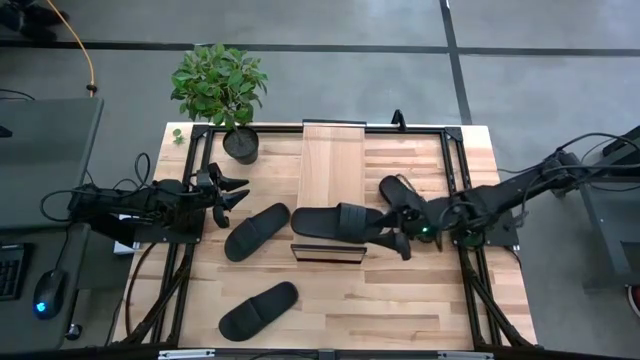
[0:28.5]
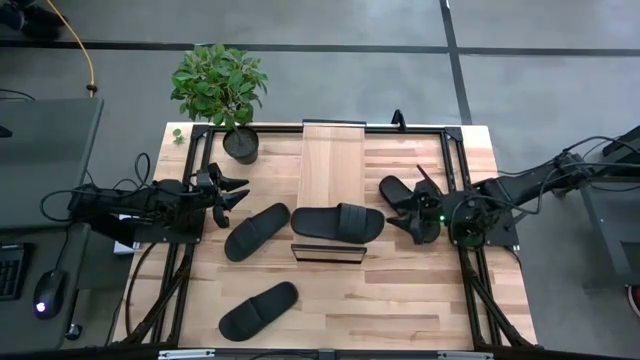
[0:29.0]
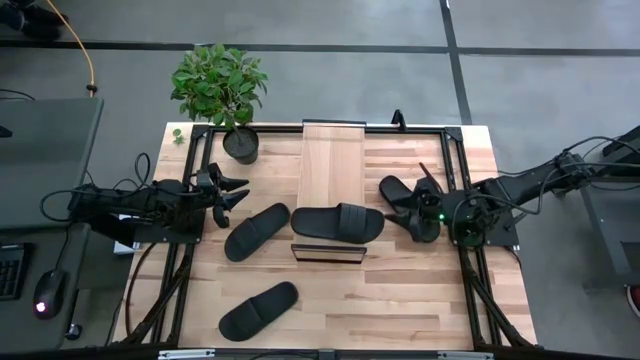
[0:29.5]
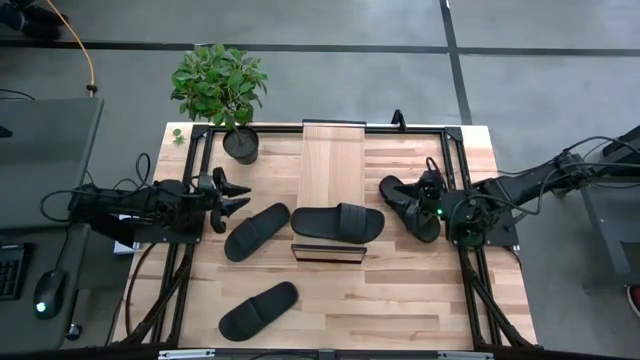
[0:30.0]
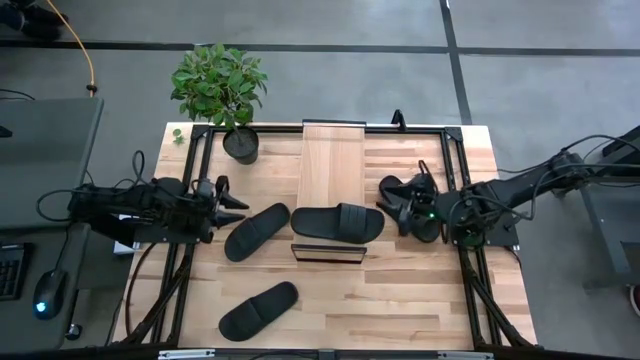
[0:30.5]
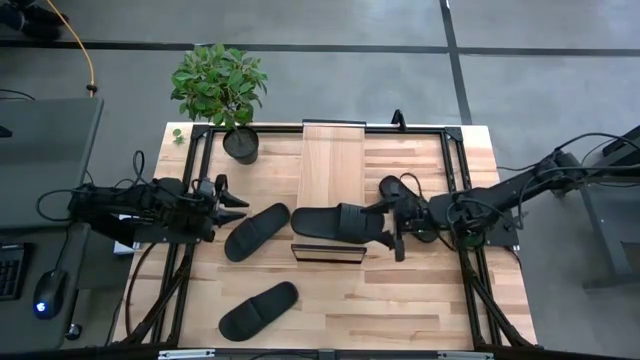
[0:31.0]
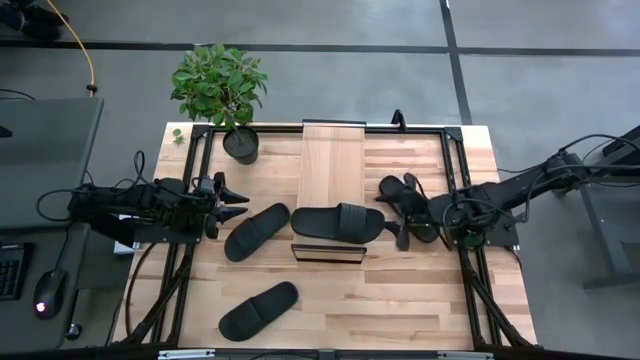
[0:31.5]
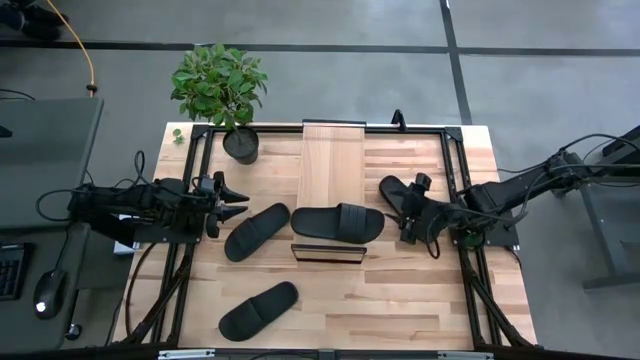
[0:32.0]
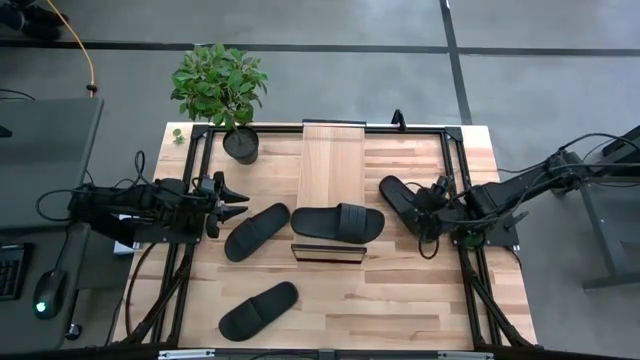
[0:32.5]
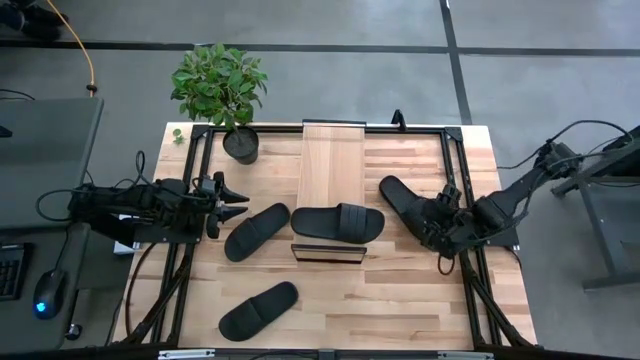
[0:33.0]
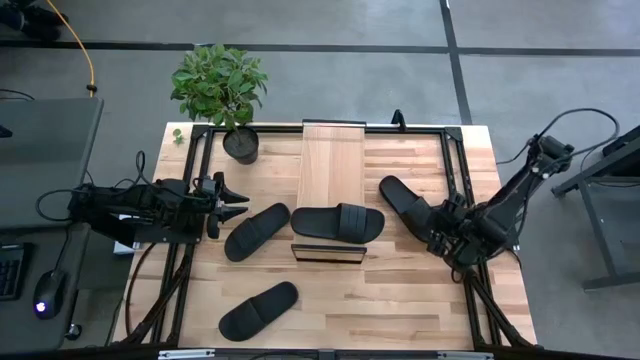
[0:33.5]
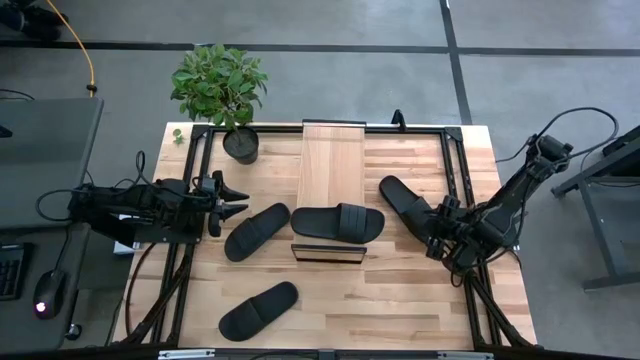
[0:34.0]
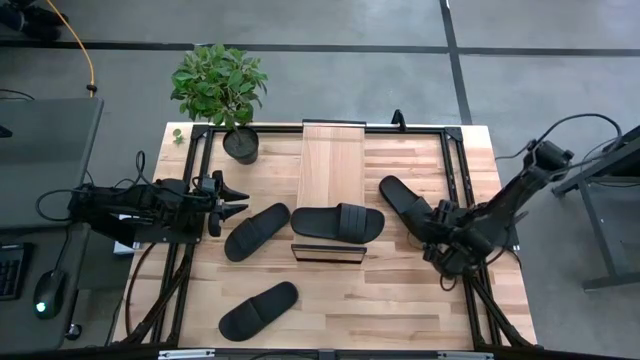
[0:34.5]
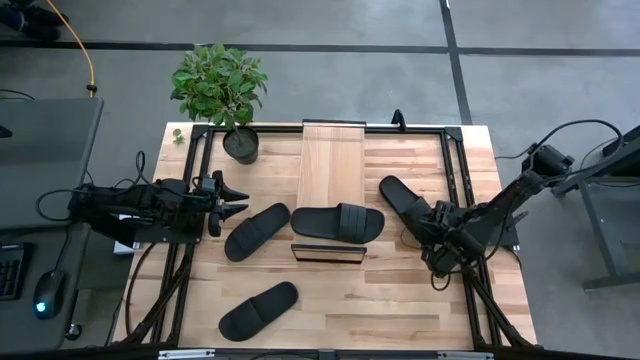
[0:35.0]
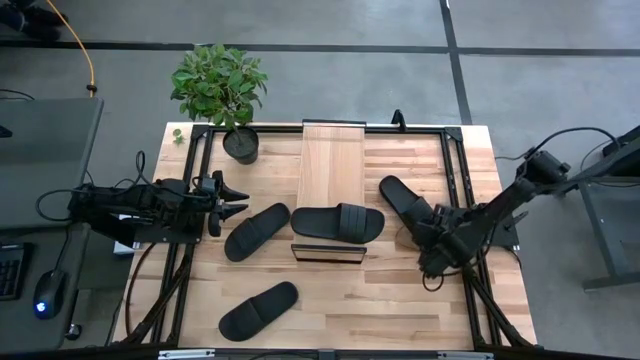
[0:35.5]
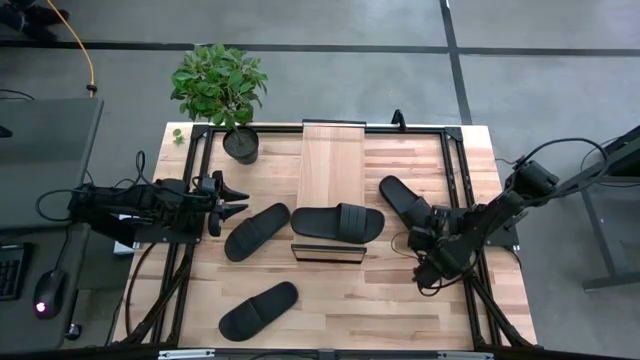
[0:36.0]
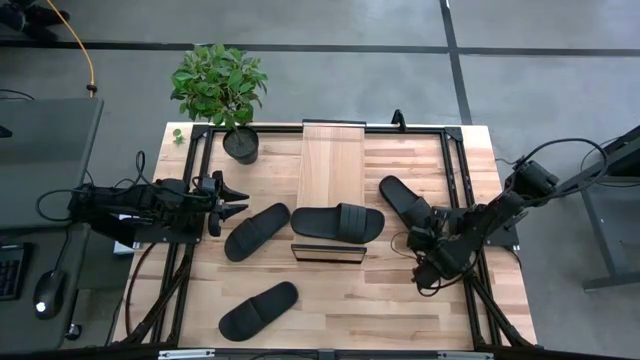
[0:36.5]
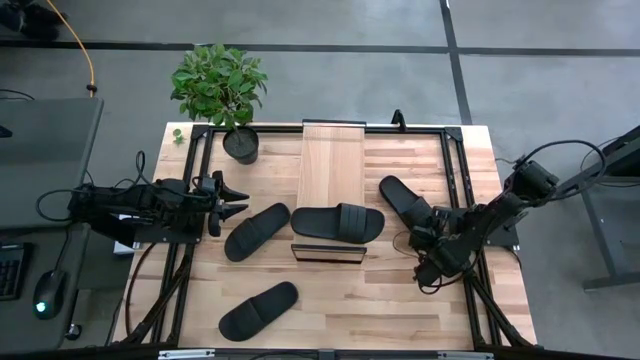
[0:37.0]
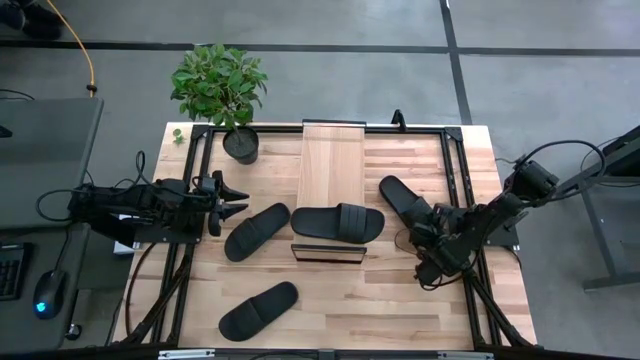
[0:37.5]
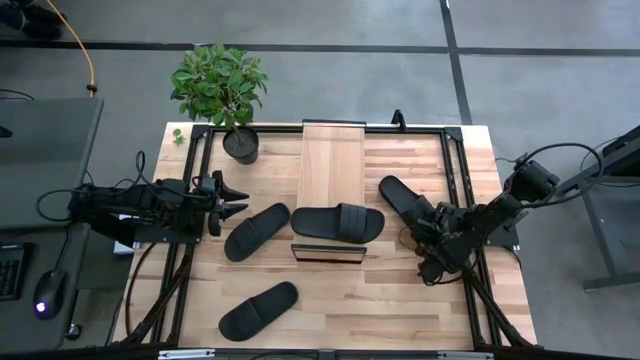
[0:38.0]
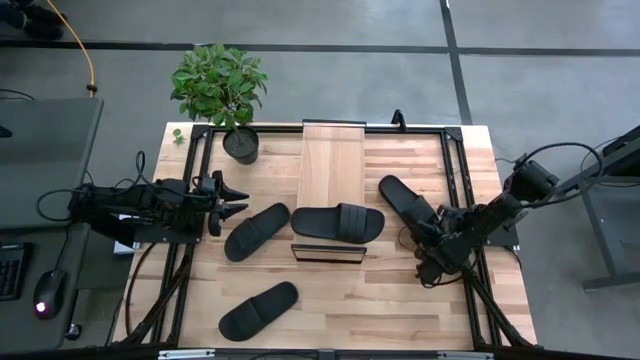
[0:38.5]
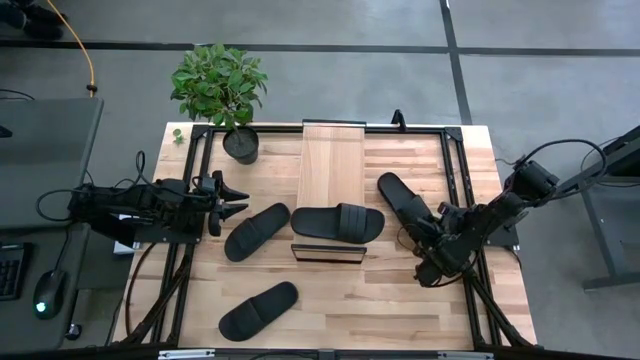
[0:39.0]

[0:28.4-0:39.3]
Task: Pick and place slides into the shelf
Put the black slide on the shelf

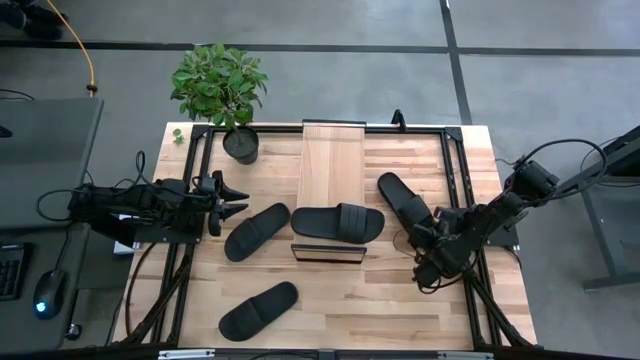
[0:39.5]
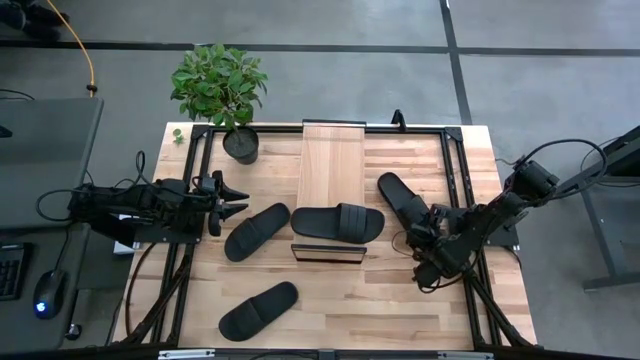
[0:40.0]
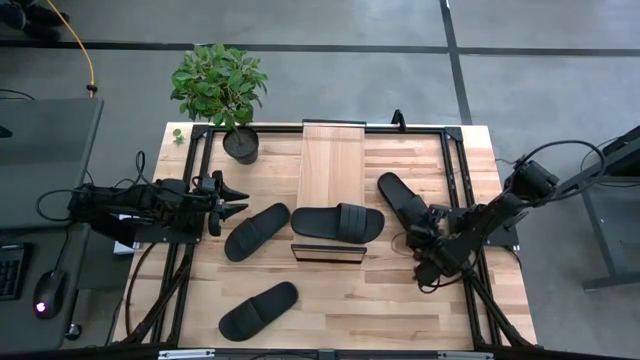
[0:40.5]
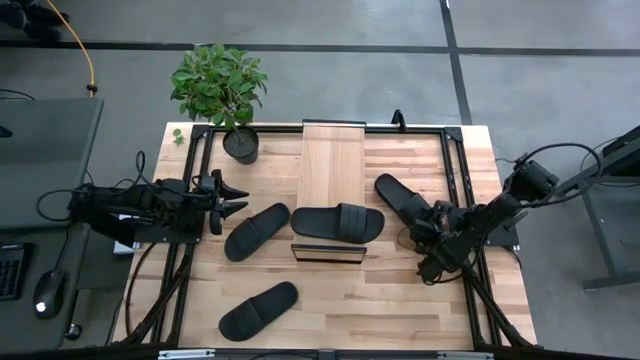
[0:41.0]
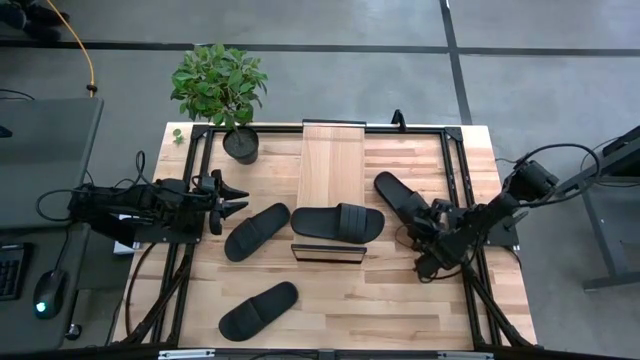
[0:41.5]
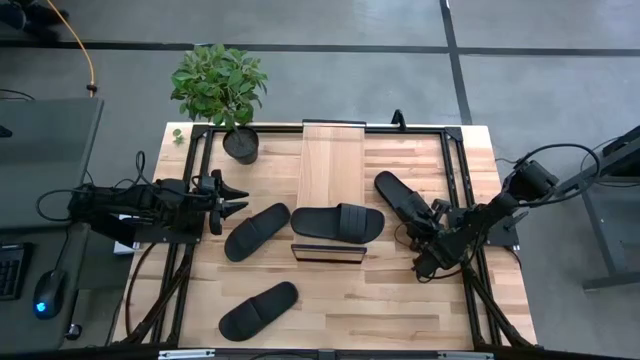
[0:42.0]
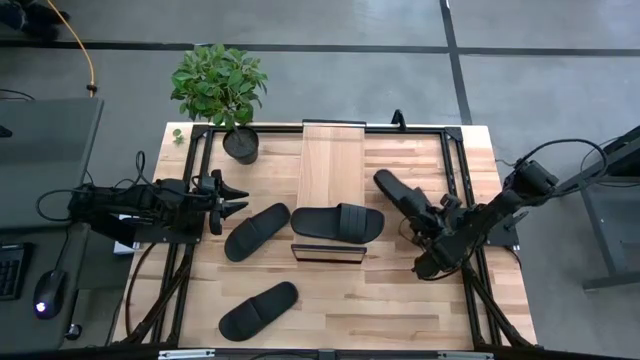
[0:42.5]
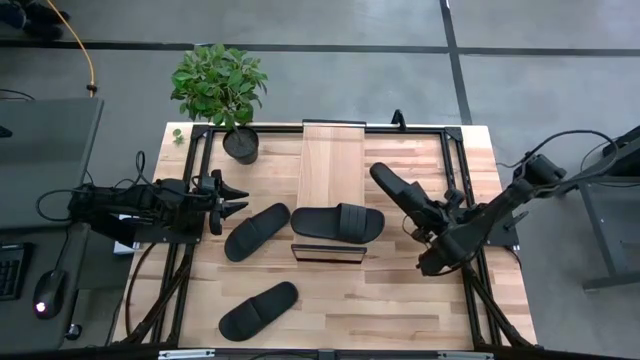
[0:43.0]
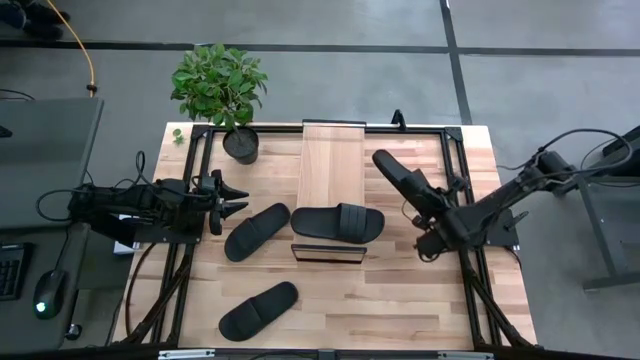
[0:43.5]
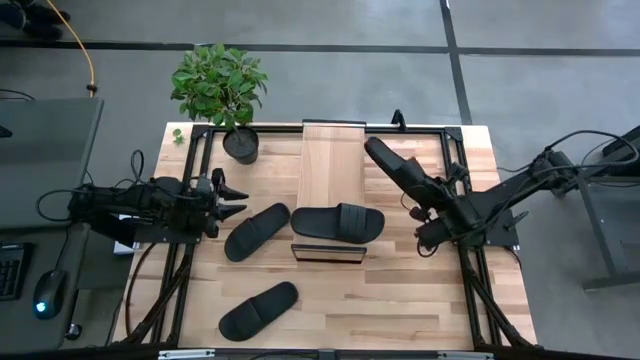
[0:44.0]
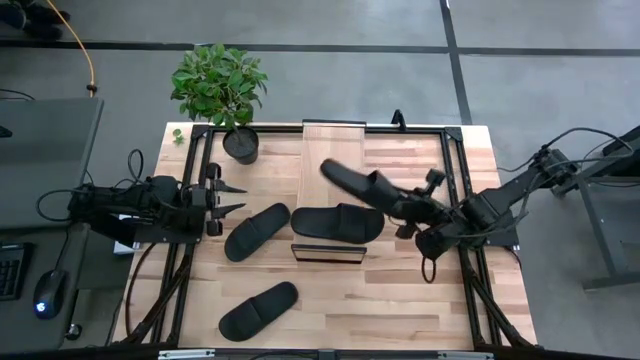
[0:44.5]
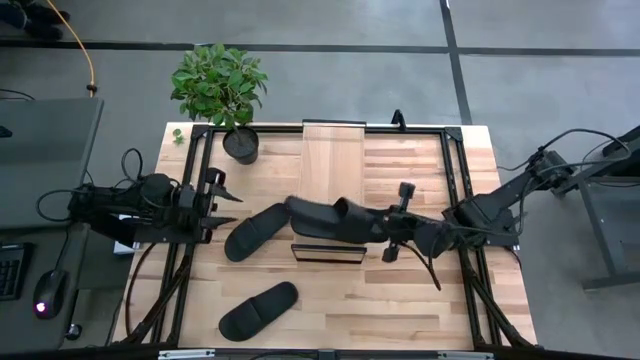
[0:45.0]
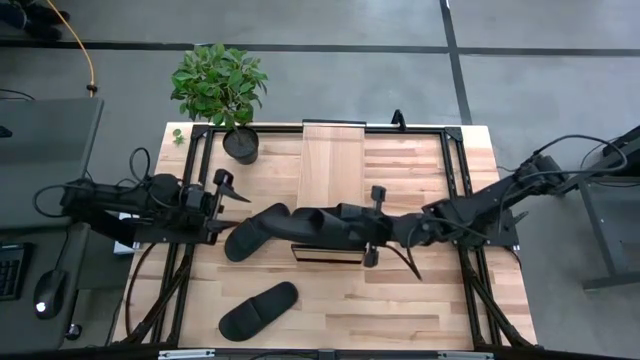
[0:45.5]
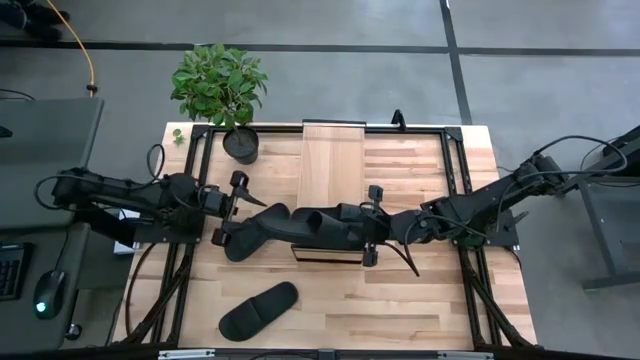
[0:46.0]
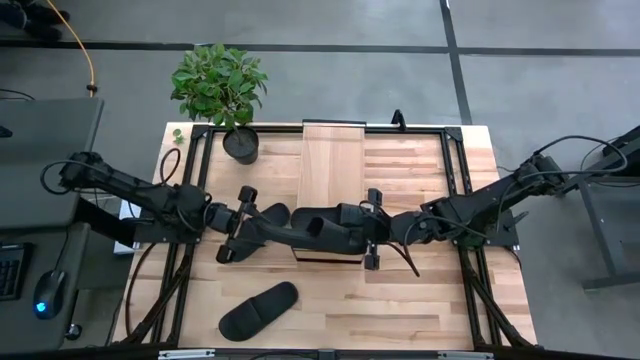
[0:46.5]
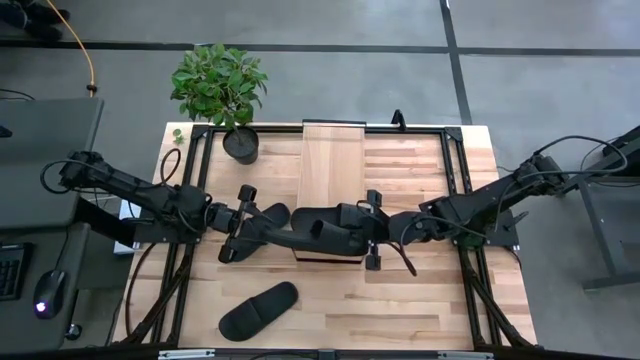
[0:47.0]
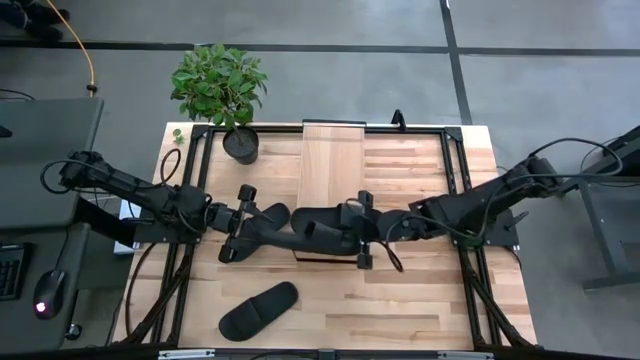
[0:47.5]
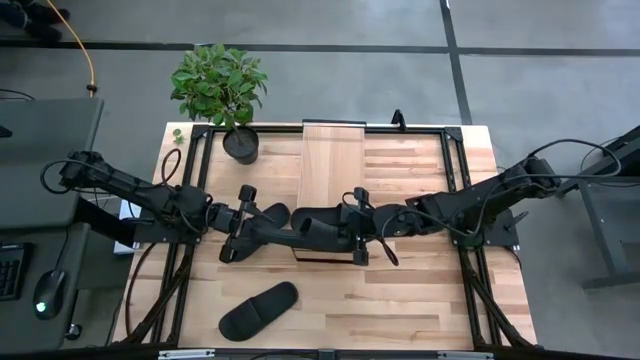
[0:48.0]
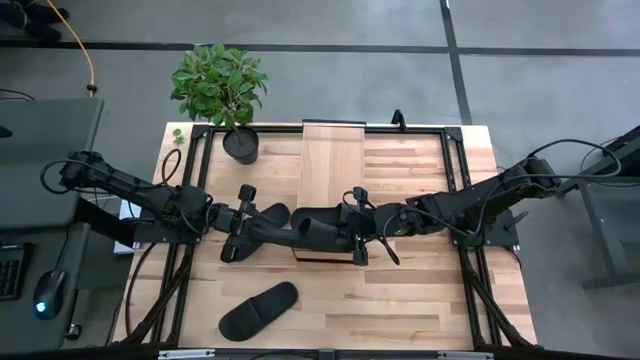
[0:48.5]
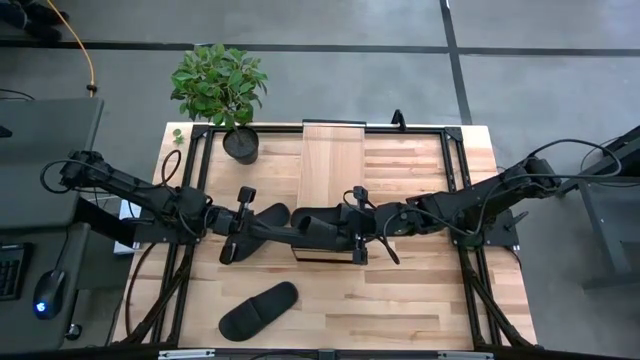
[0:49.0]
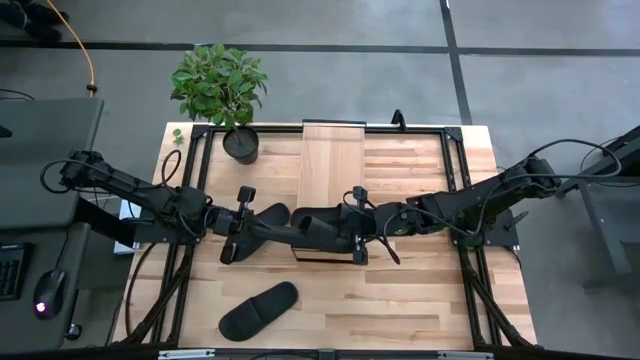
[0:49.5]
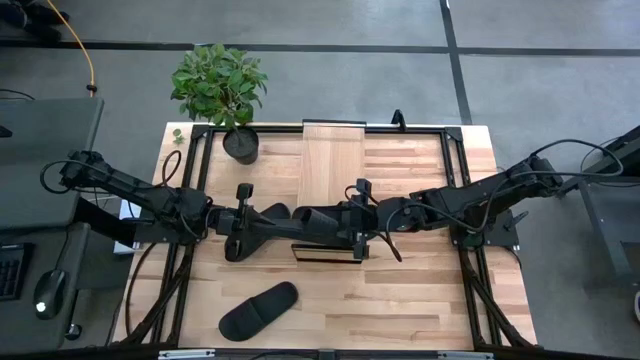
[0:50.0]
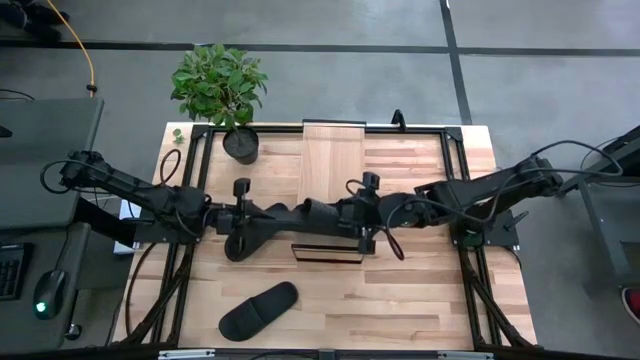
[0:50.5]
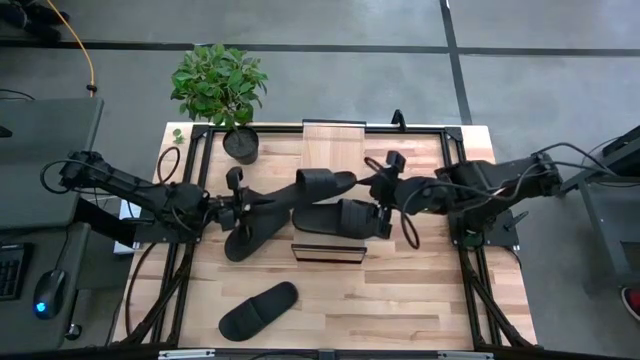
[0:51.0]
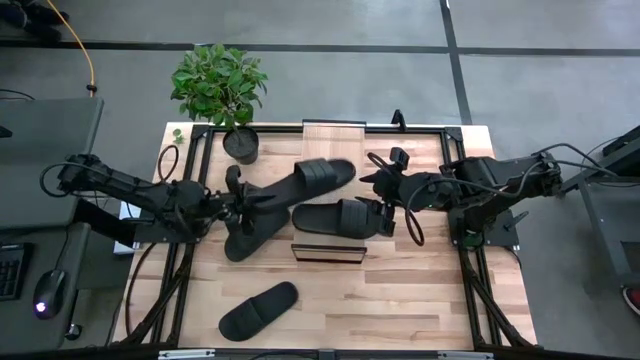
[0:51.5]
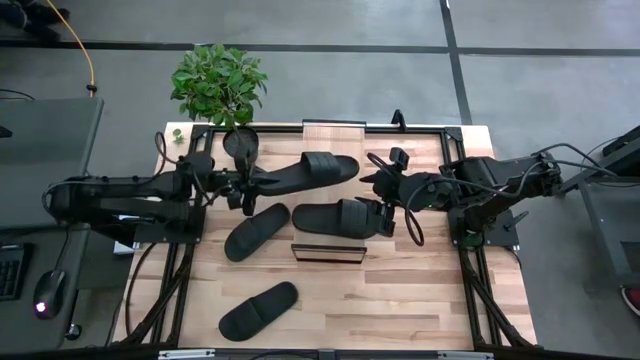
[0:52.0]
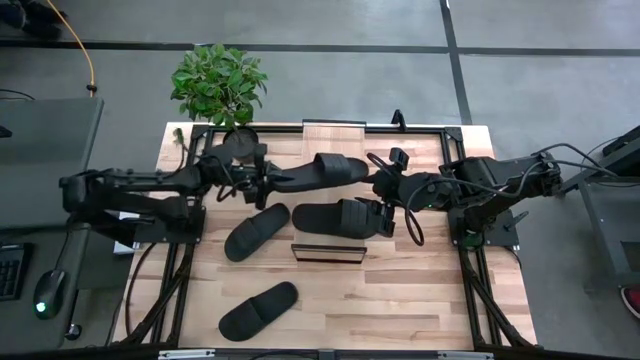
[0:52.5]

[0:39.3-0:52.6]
Put the black slide on the shelf
